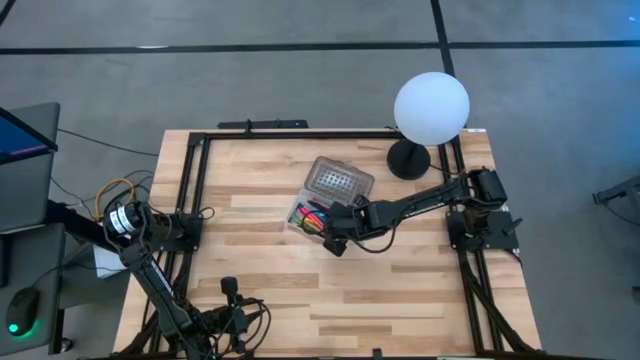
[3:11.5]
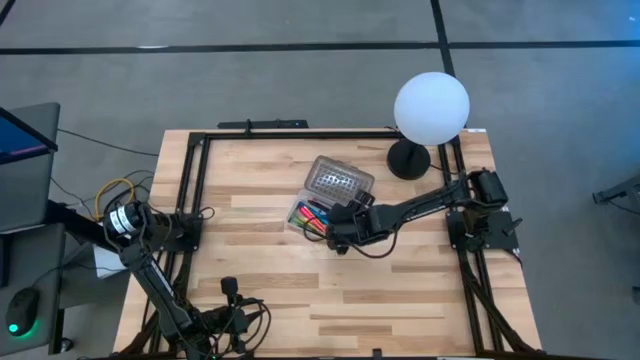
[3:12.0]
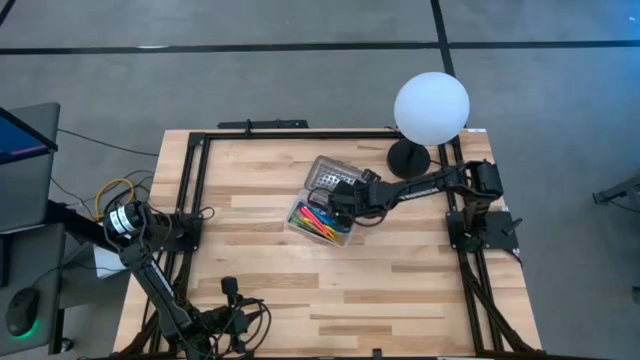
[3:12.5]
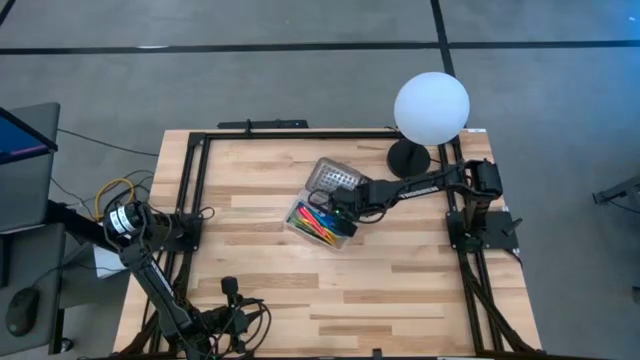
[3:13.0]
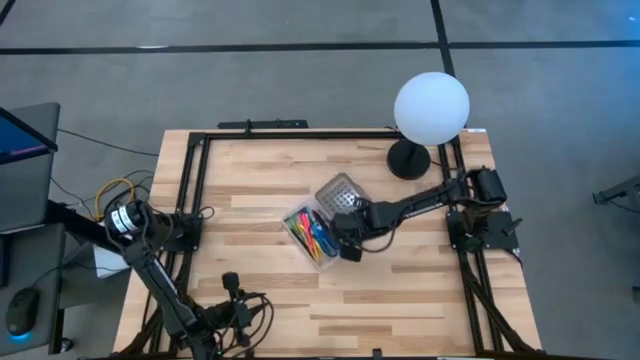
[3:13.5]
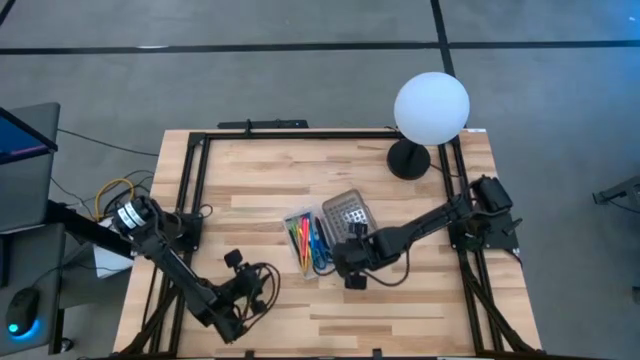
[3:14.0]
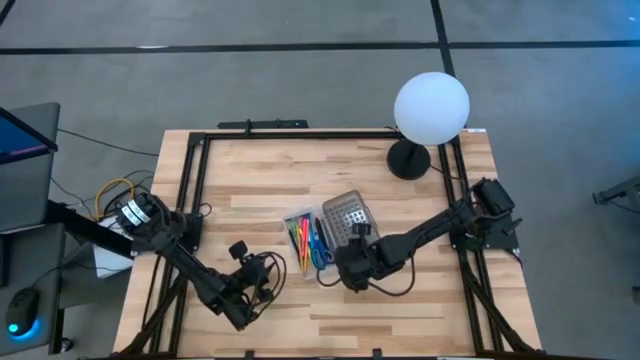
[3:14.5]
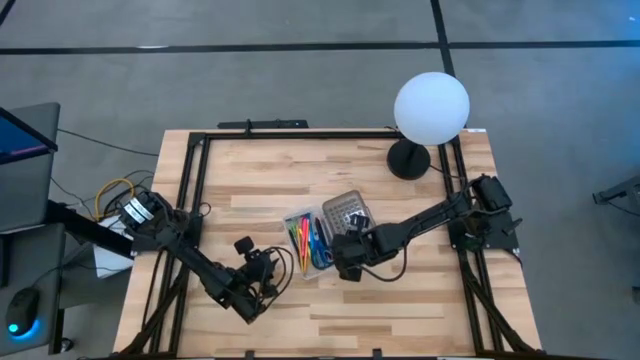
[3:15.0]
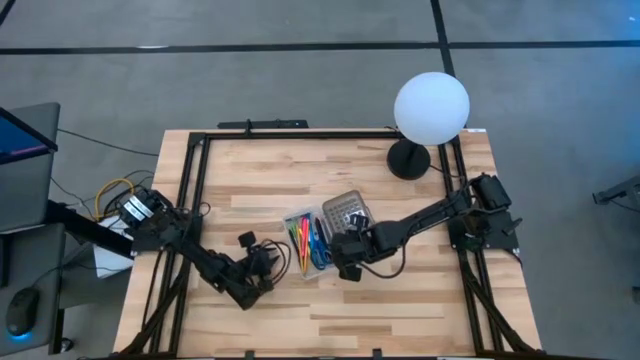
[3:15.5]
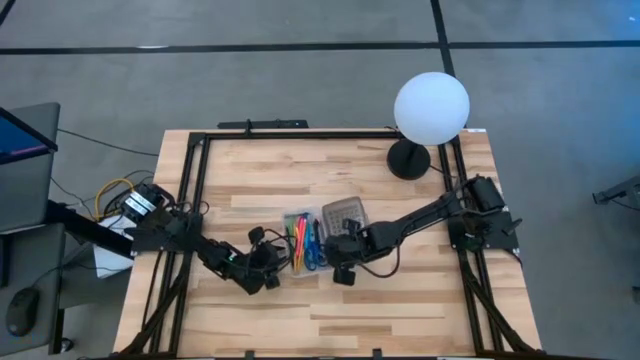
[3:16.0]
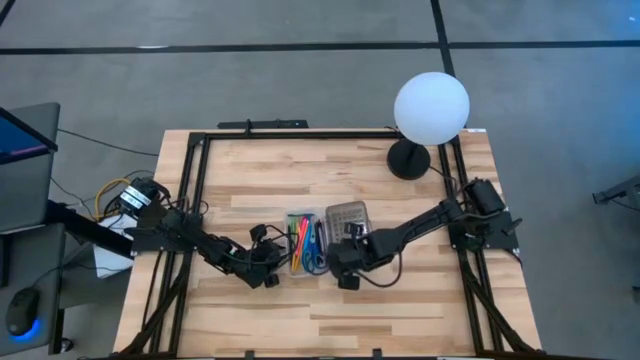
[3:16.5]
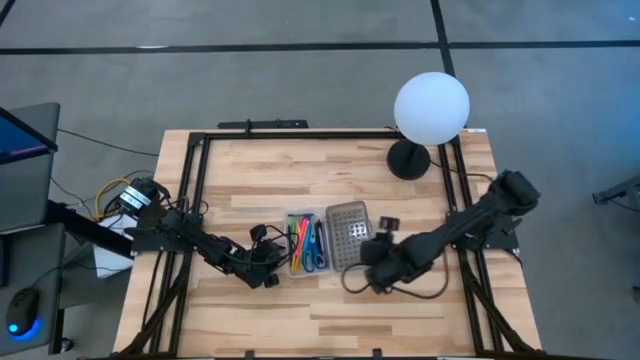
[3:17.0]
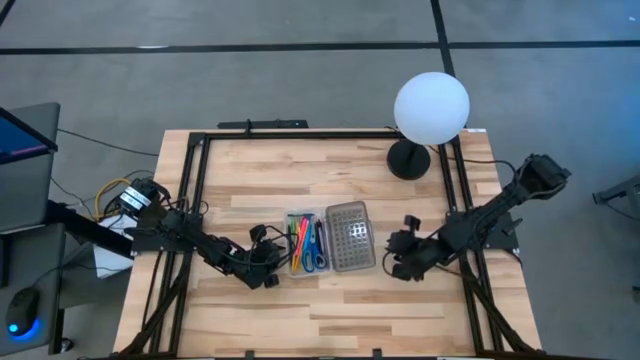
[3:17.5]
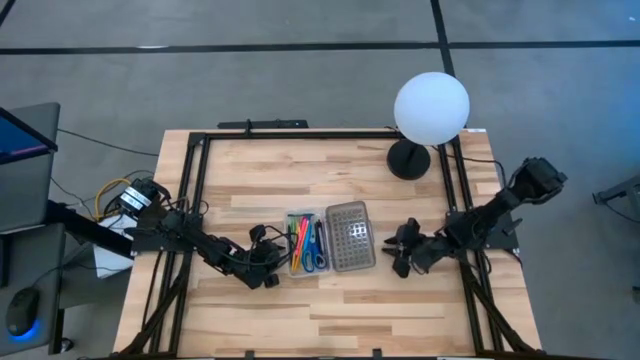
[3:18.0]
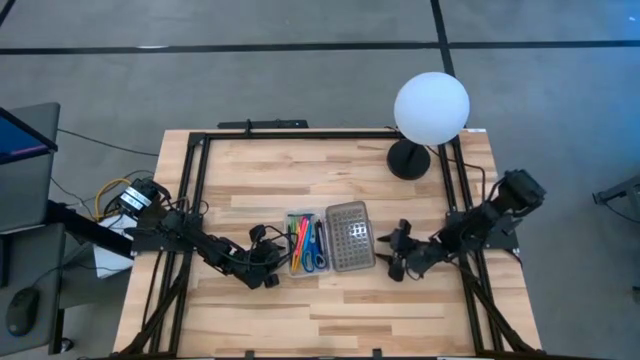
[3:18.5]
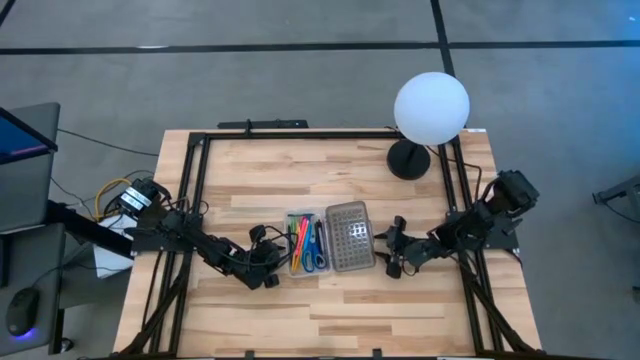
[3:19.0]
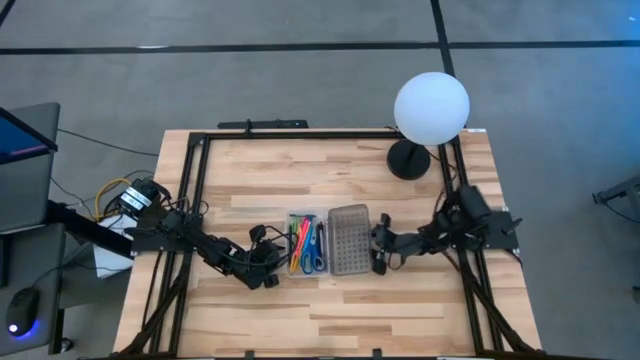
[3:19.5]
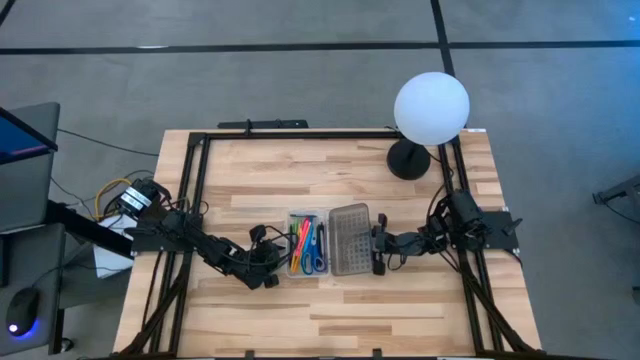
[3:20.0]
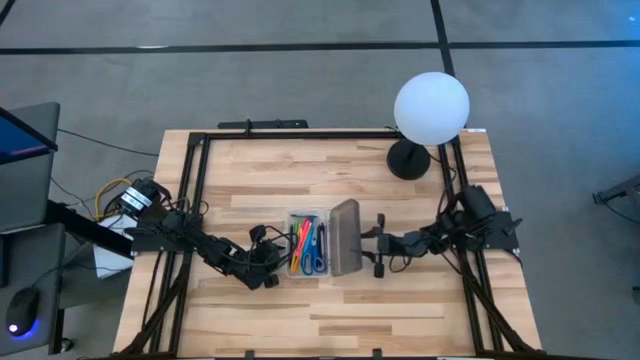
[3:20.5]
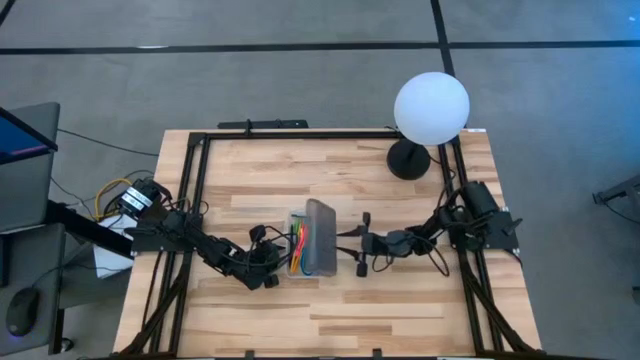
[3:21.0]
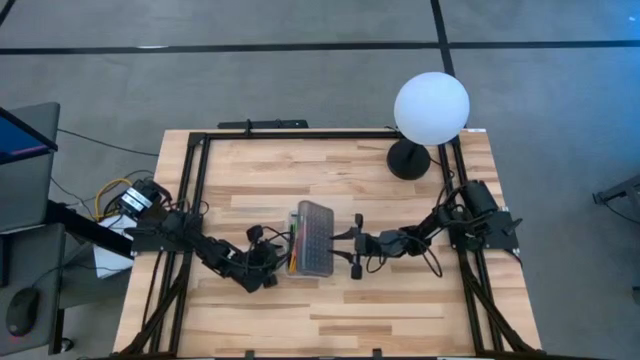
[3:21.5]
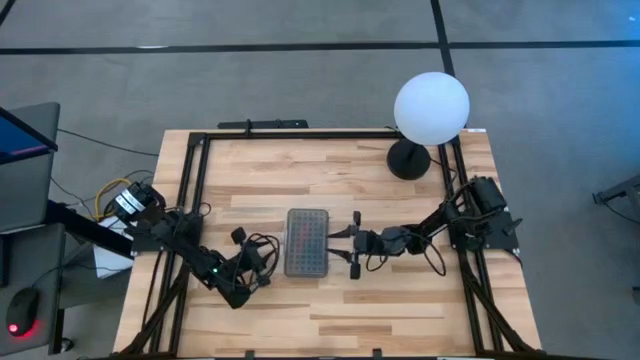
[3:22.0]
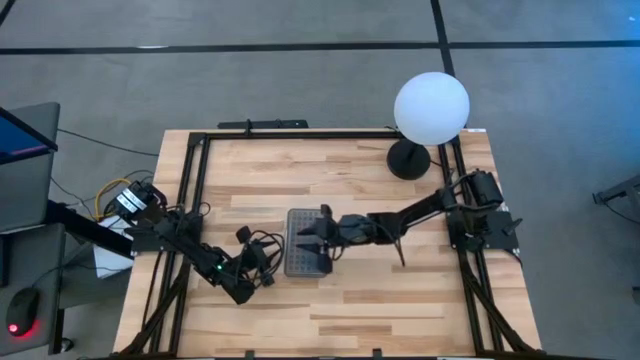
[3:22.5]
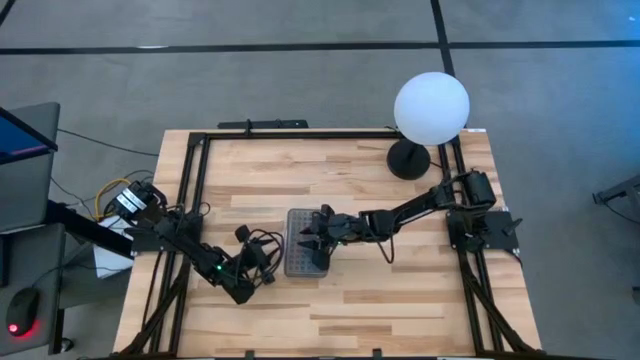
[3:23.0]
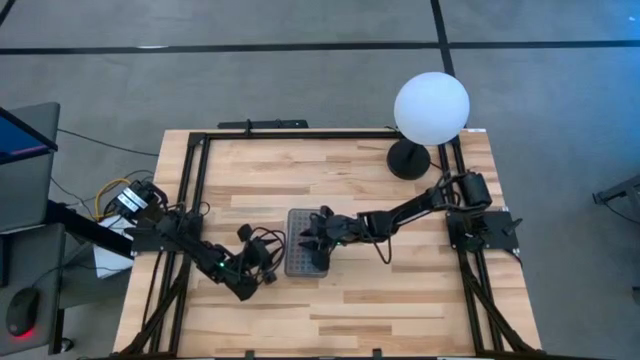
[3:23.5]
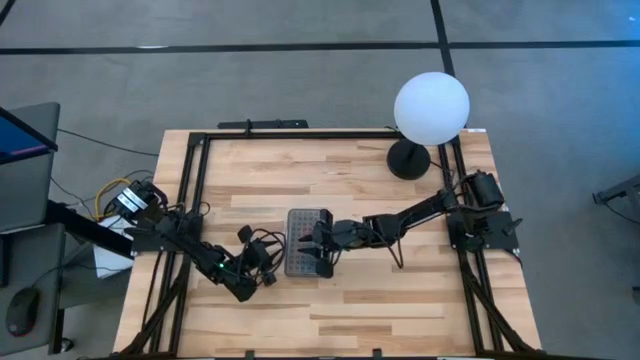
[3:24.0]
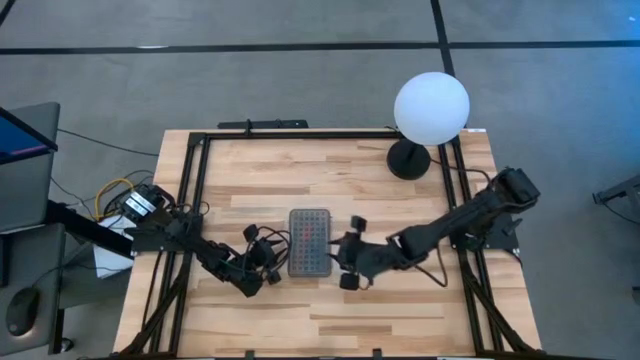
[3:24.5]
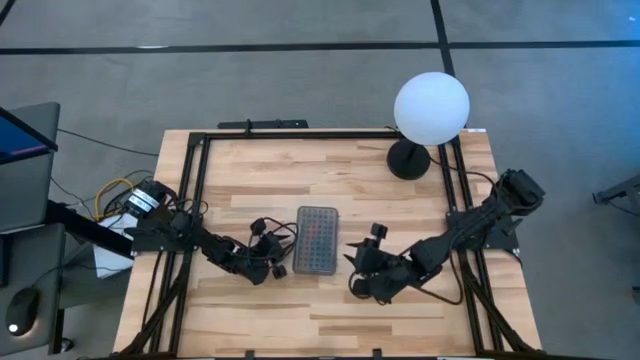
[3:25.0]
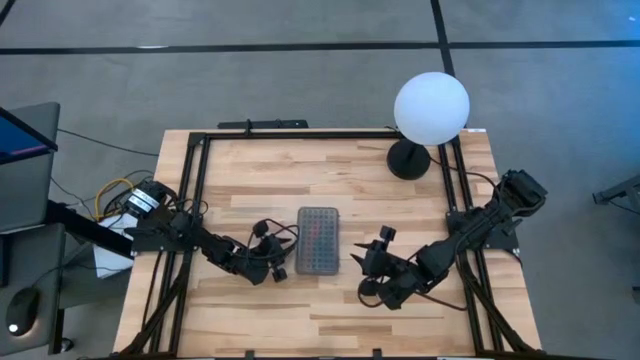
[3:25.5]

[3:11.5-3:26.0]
Task: Pick & place school supplies into a supply box
Close the gray supply box

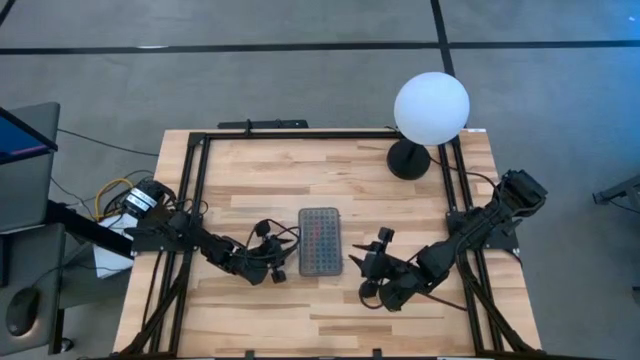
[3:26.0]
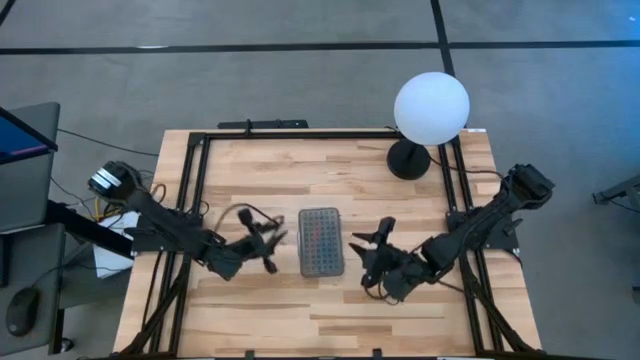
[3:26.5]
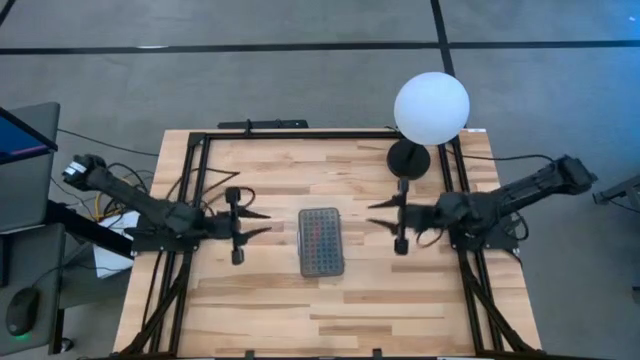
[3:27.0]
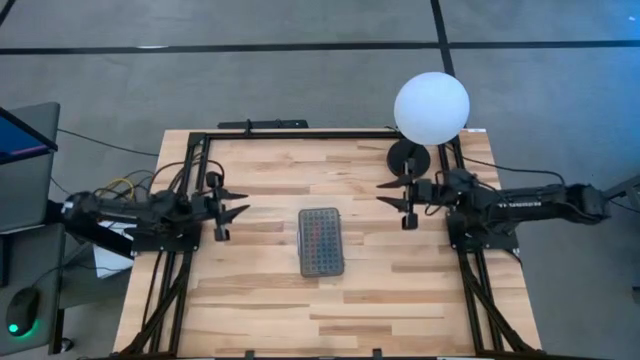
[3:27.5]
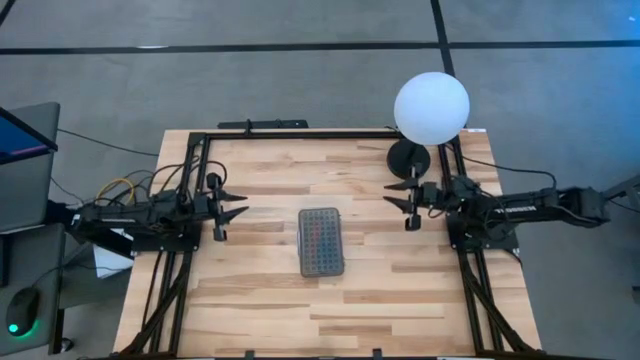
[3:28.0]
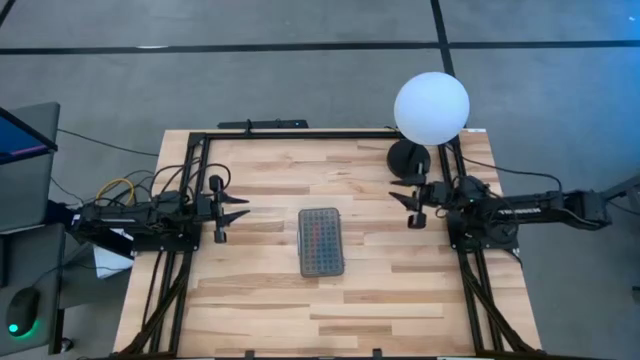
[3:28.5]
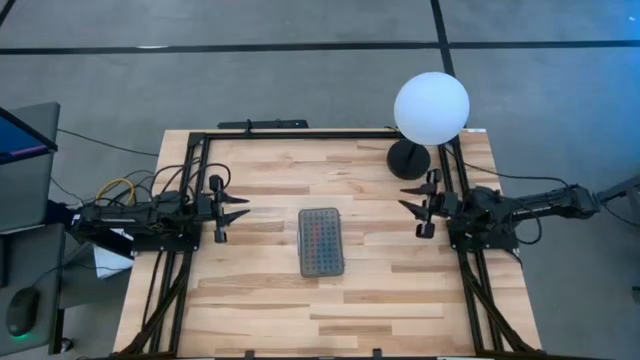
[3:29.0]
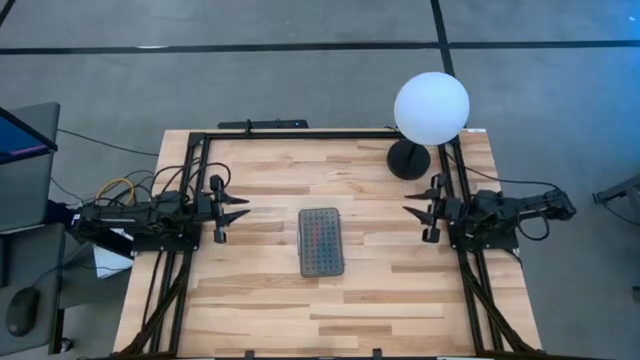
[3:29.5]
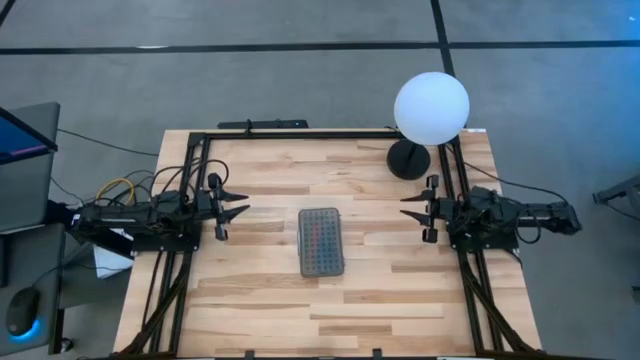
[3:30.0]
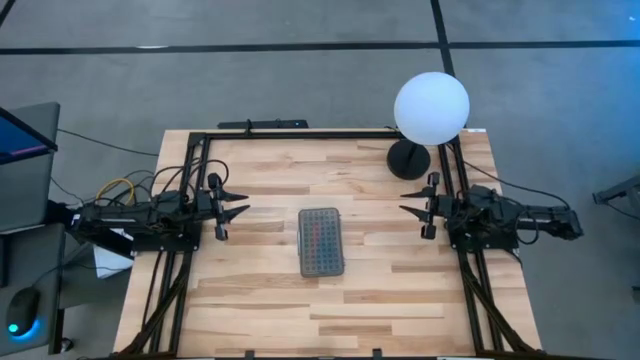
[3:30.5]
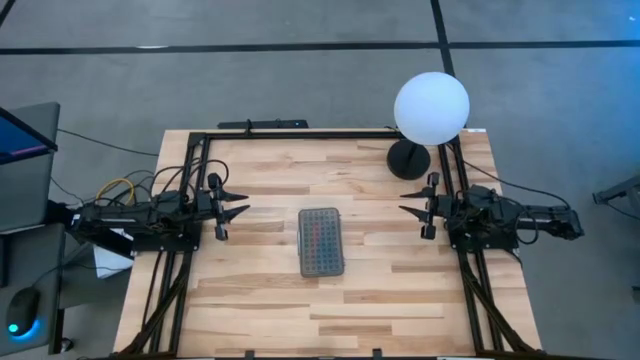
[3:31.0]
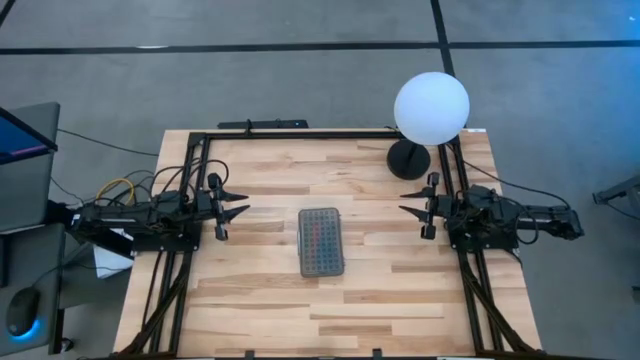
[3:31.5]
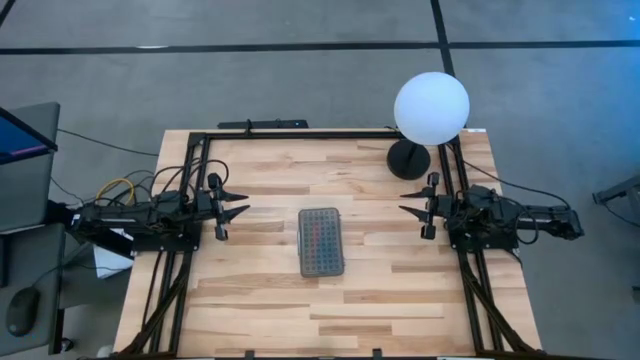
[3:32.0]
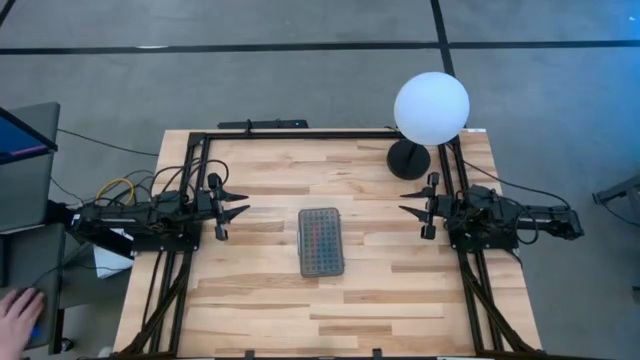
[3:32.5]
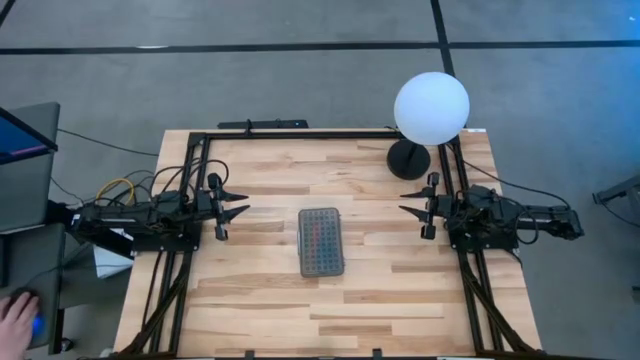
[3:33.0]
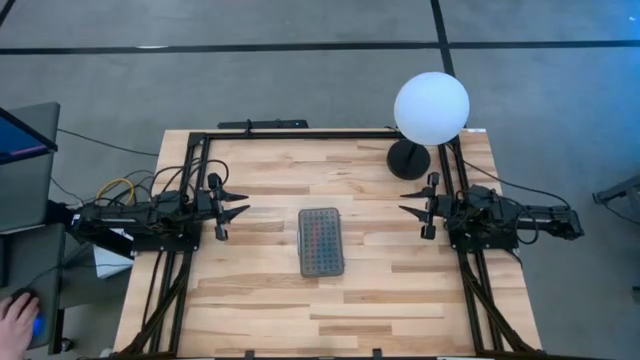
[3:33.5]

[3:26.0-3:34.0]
Return to Home Position
